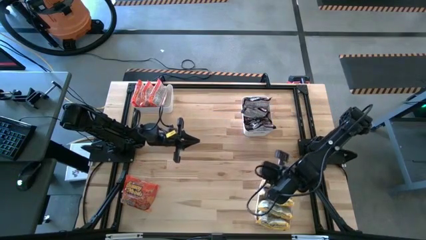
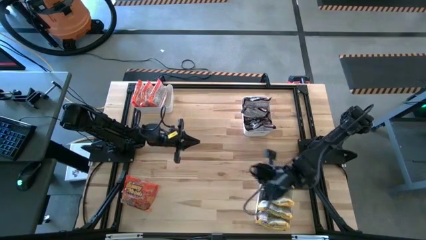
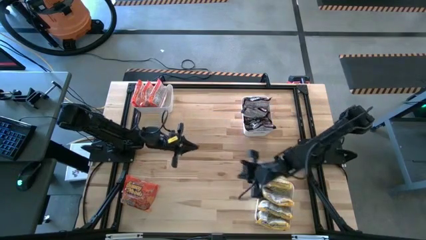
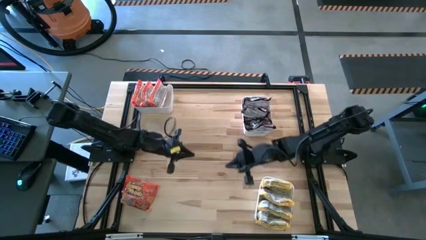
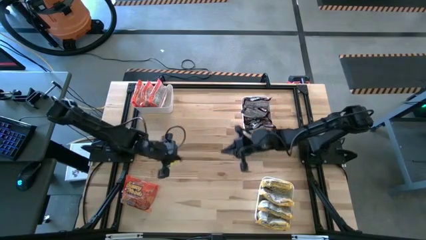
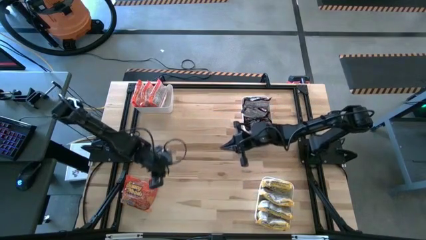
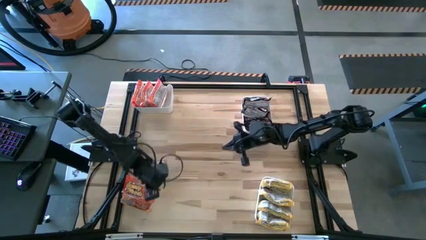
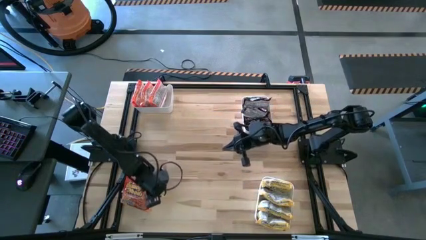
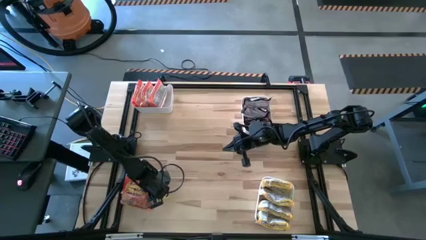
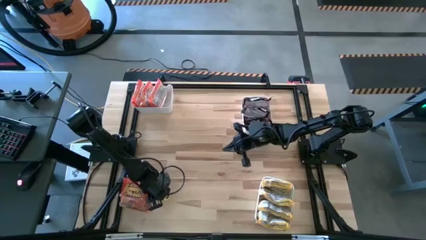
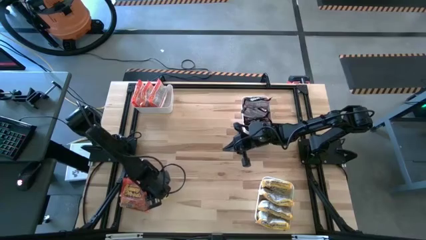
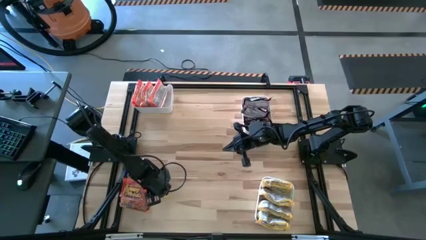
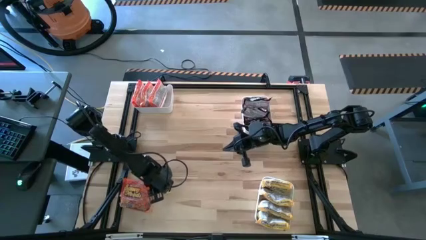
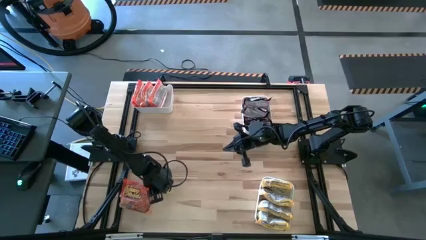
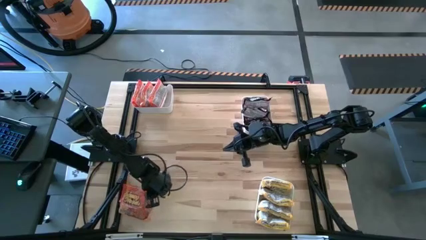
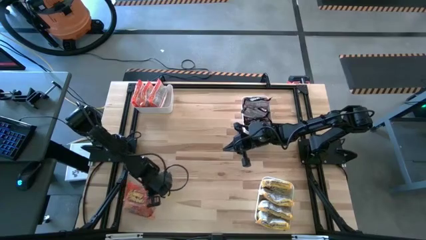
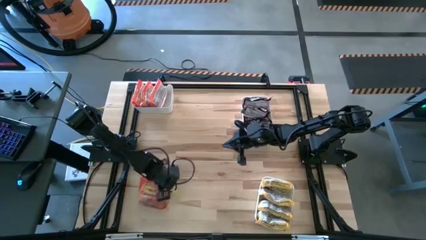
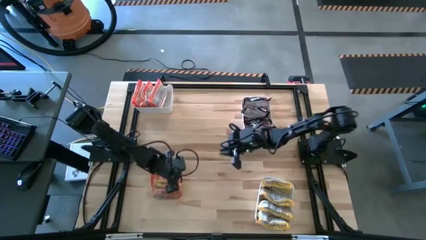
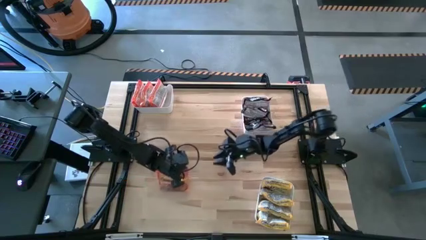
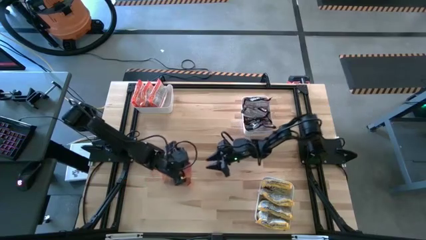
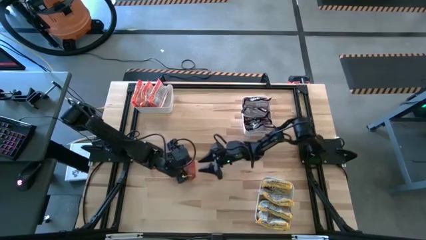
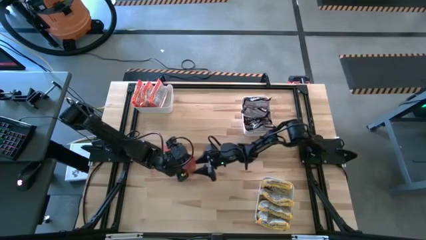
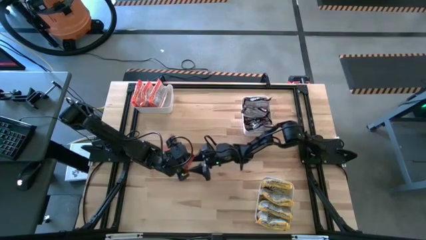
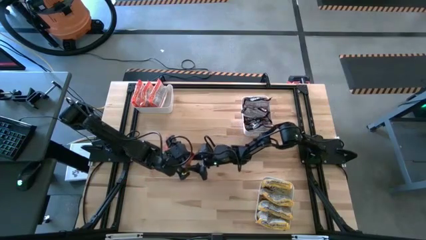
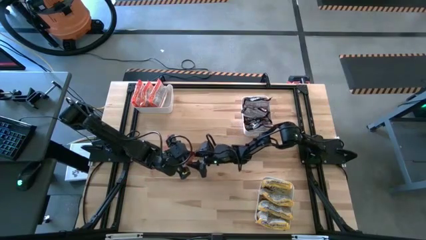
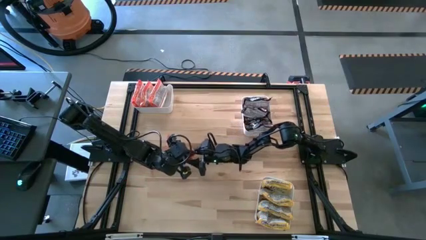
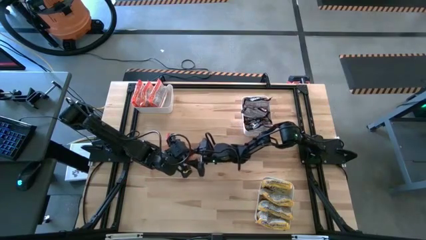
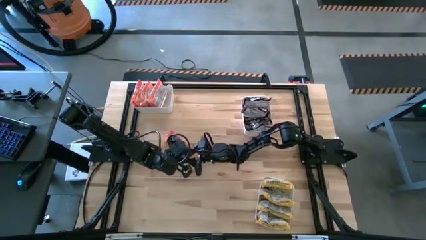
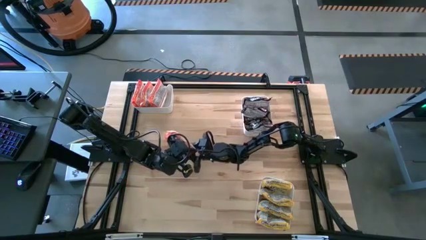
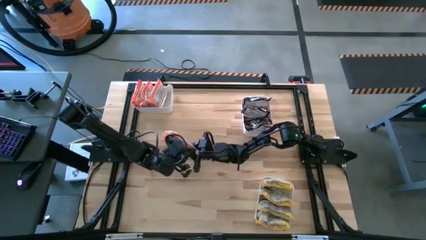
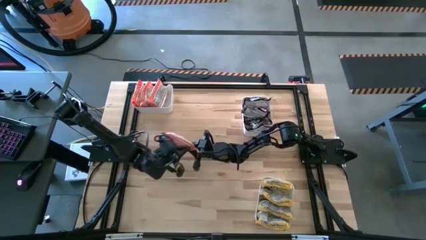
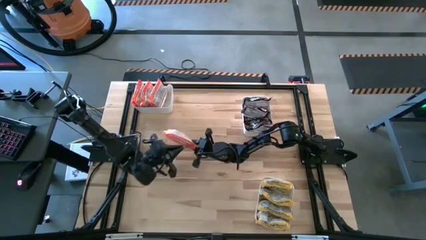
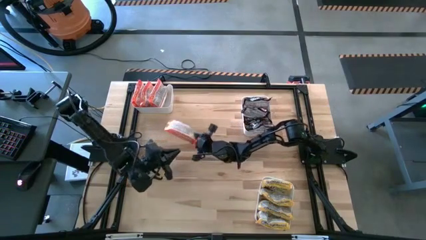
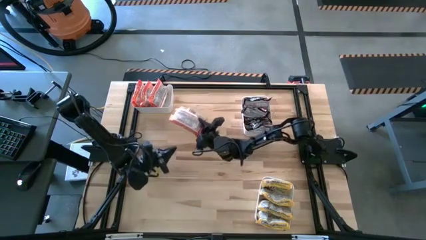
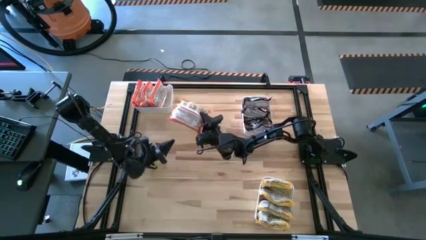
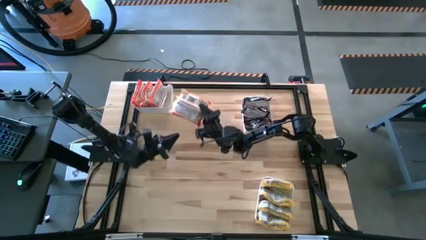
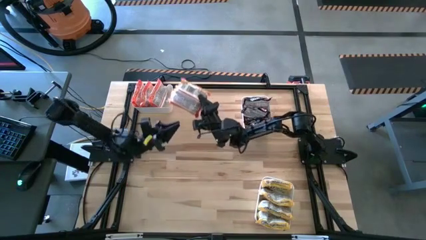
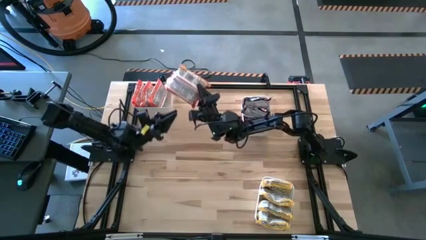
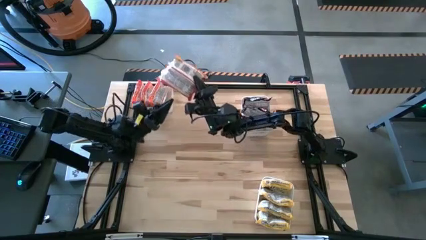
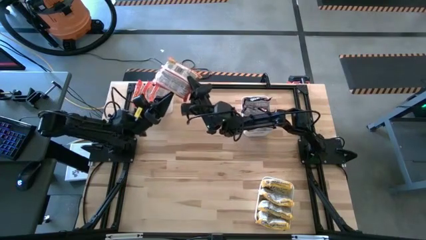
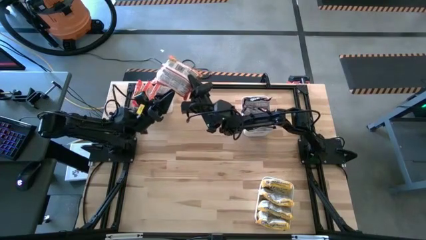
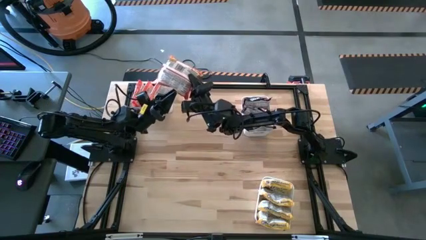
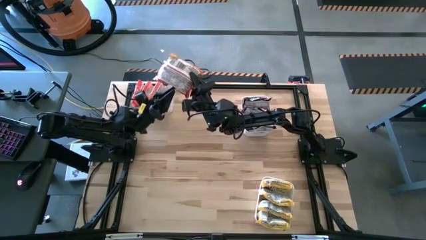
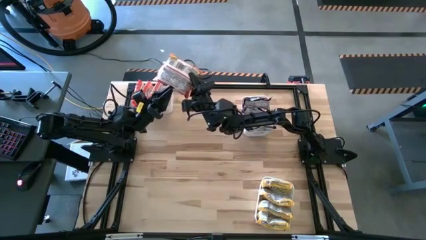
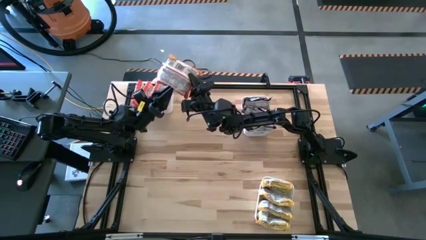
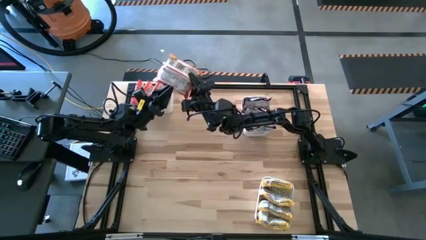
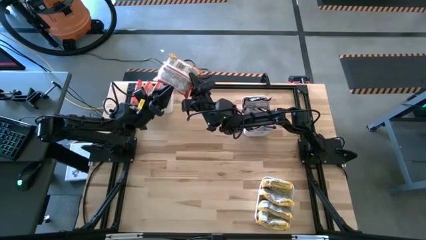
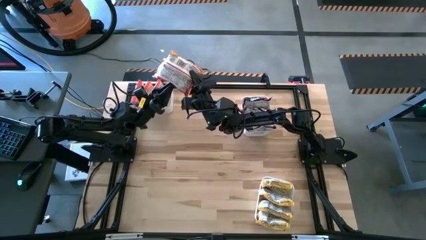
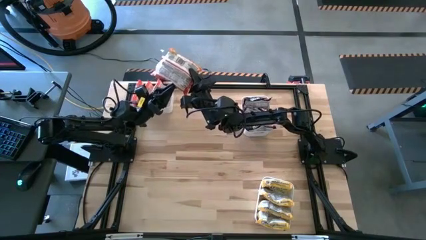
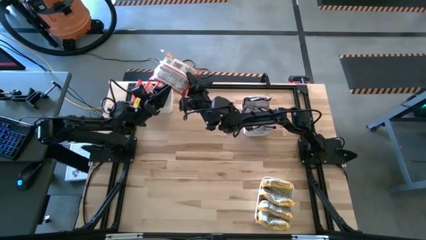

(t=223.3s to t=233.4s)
Task: Sort Maruchan noodles
Put the orange noodle pack into the top left white bin

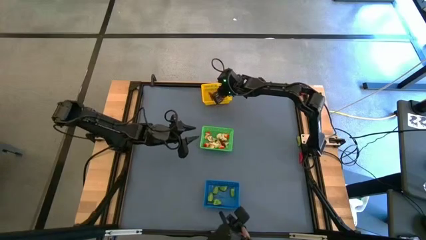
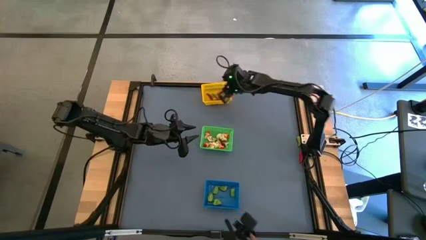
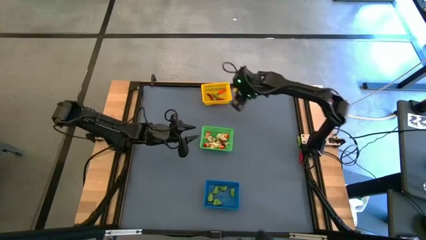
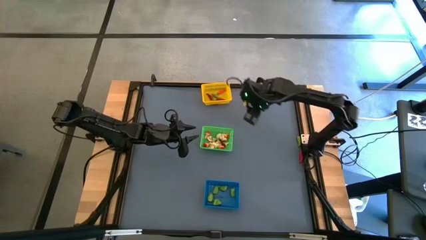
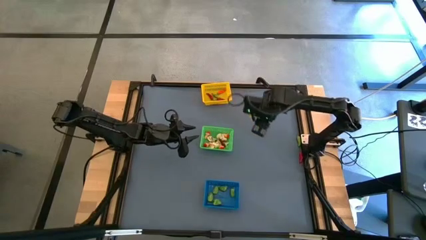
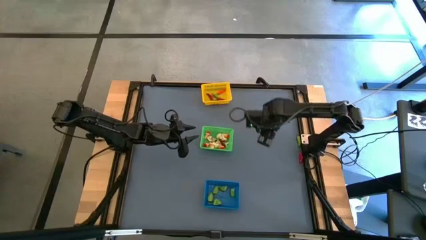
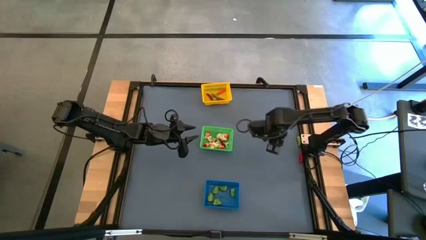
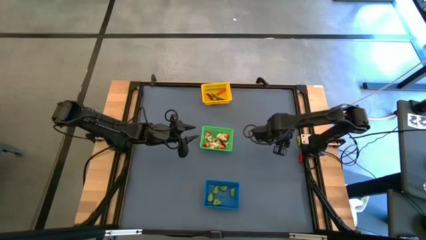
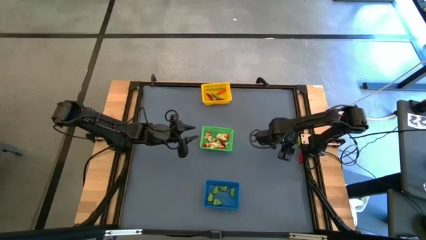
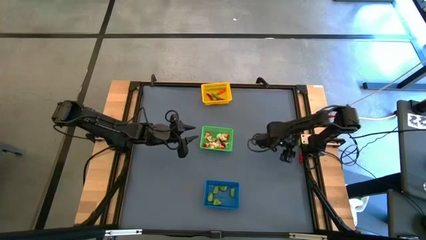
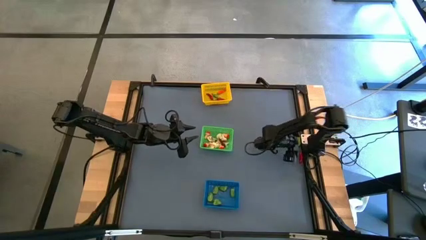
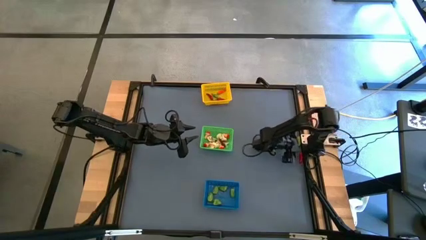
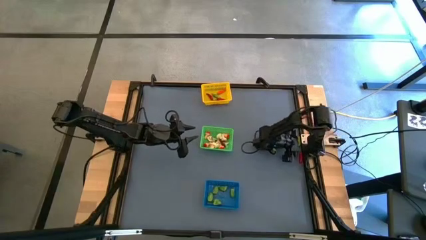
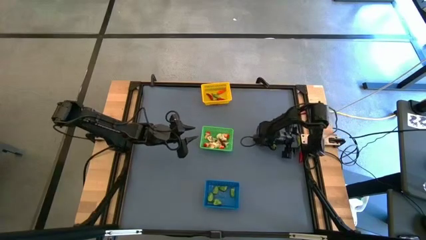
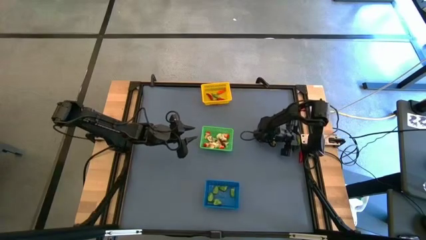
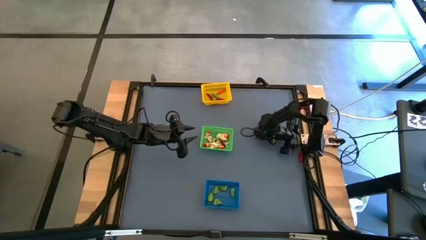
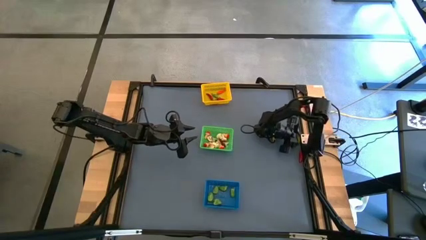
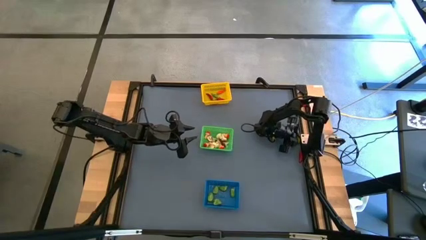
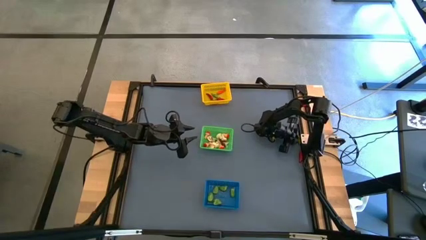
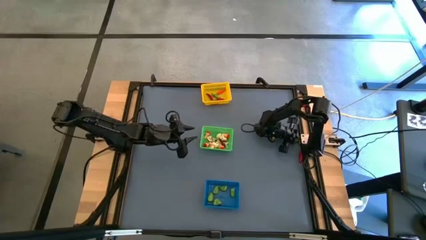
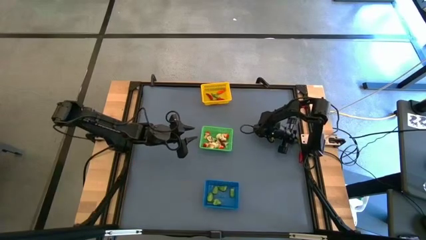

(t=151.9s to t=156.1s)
Task: Sort produce into baskets
Put the green chili pepper into the yellow bin

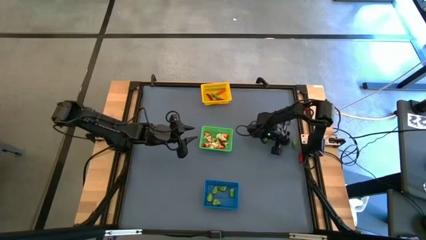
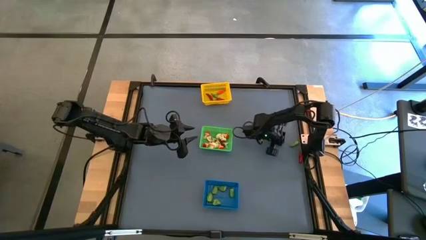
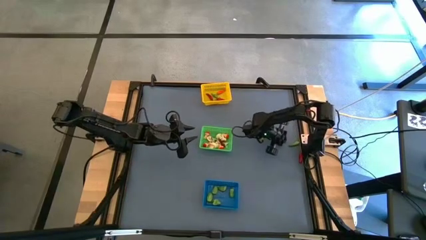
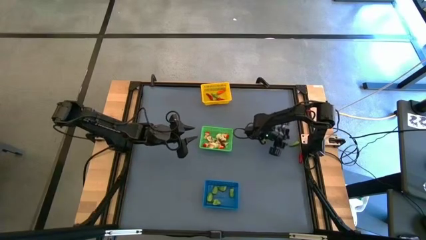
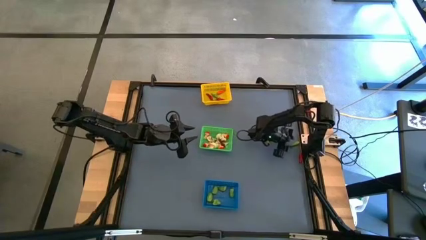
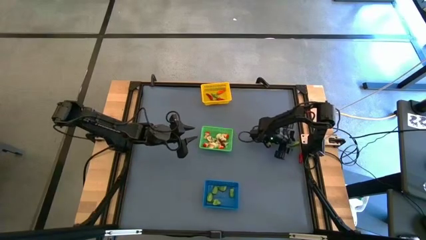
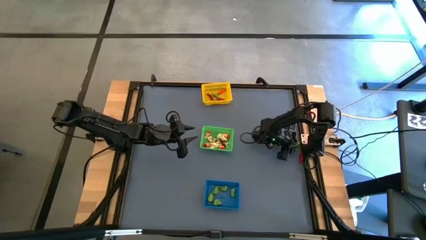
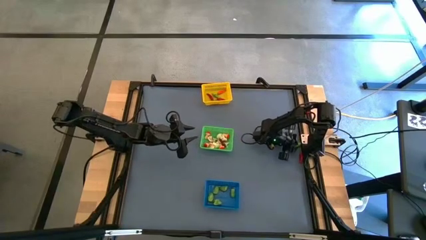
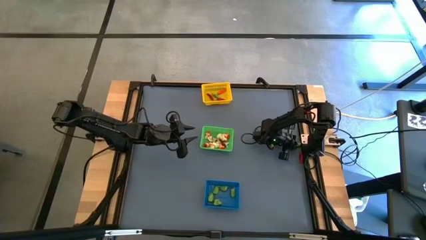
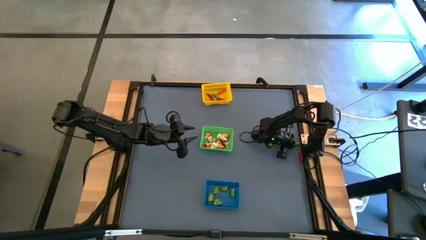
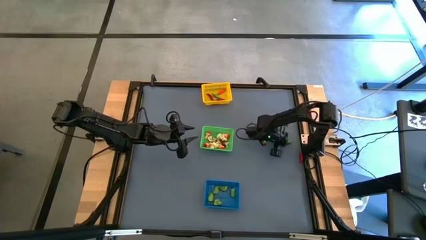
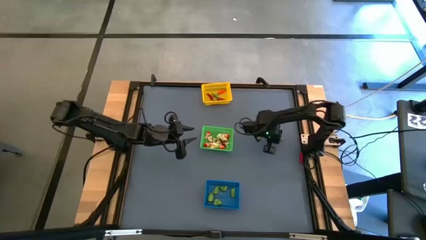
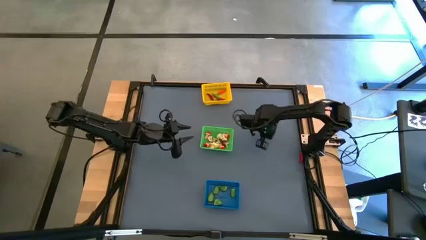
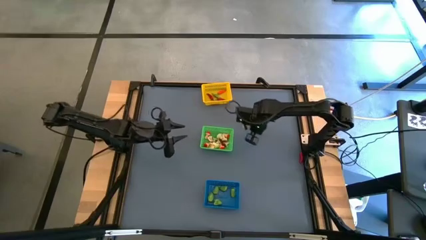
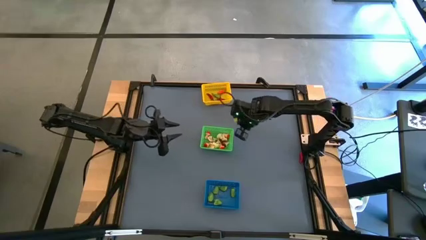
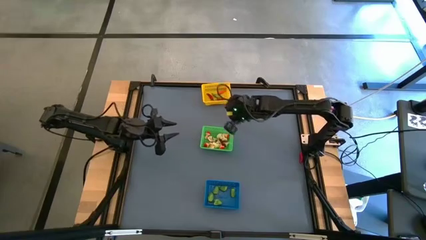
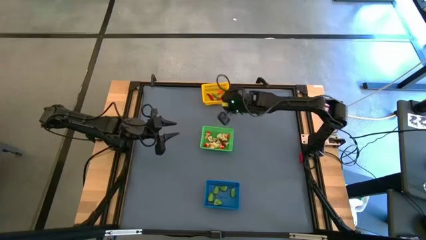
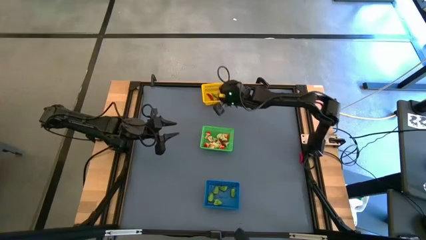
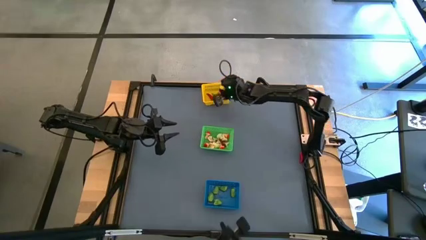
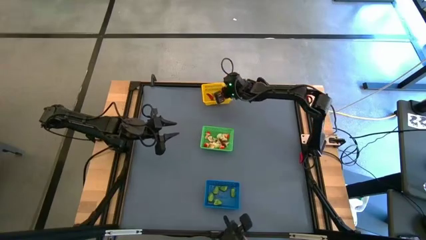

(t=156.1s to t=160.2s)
Put the green chili pepper into the yellow bin
